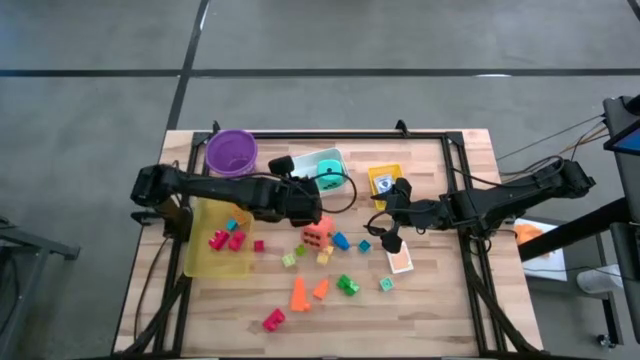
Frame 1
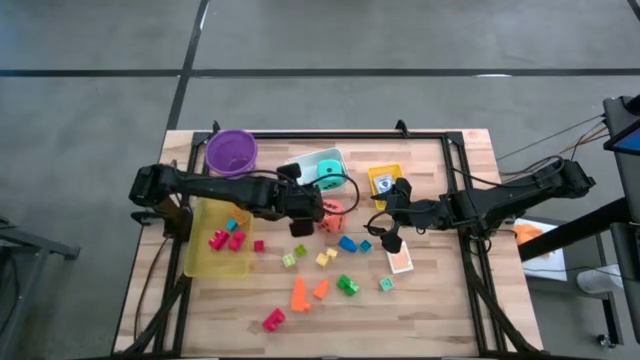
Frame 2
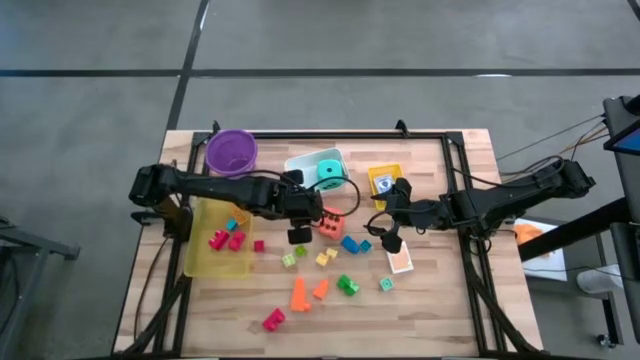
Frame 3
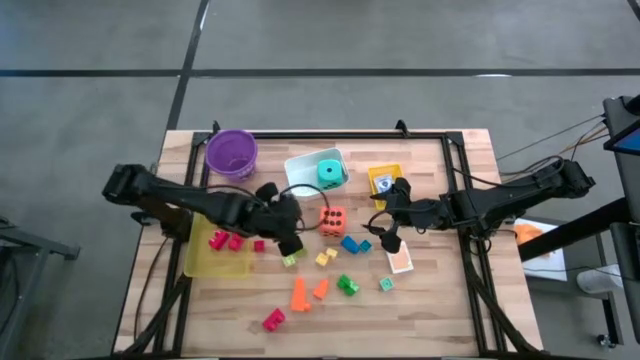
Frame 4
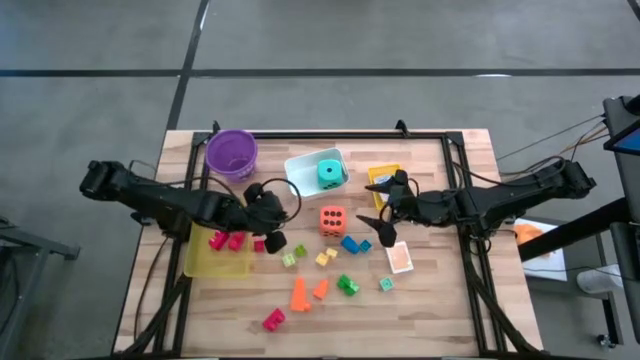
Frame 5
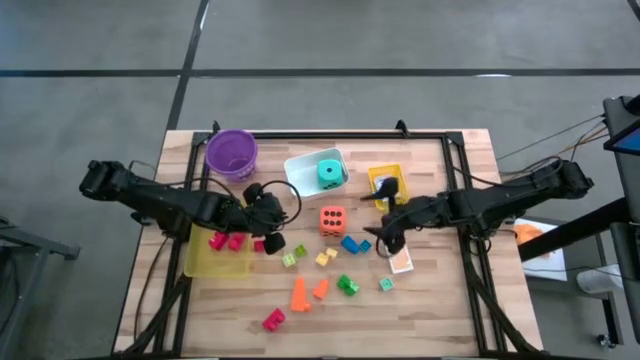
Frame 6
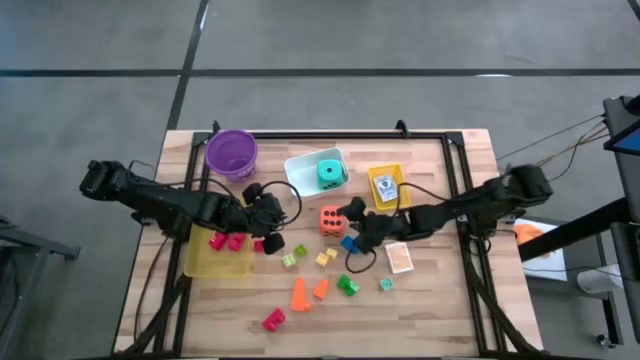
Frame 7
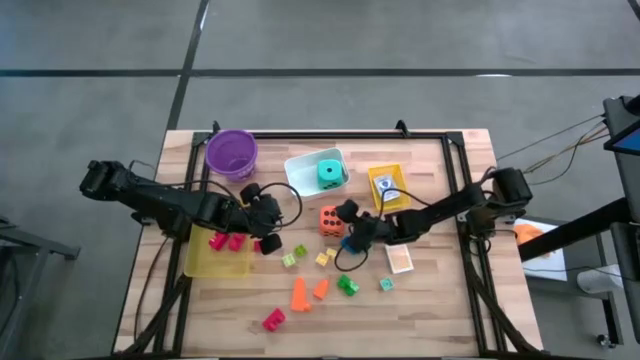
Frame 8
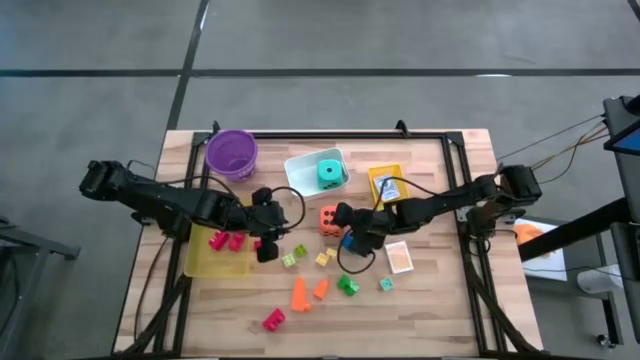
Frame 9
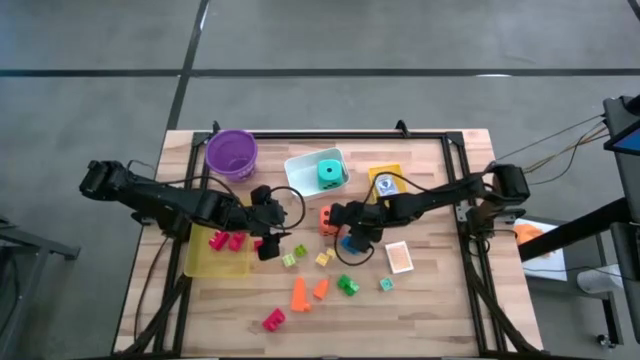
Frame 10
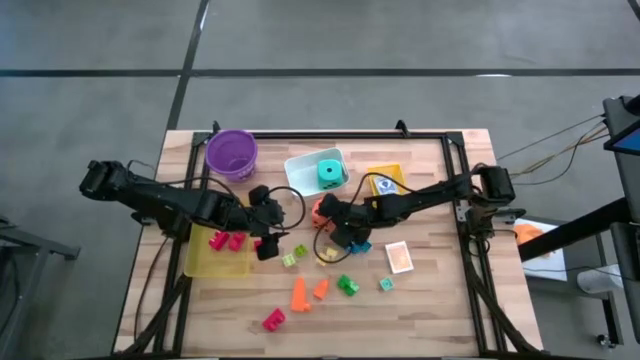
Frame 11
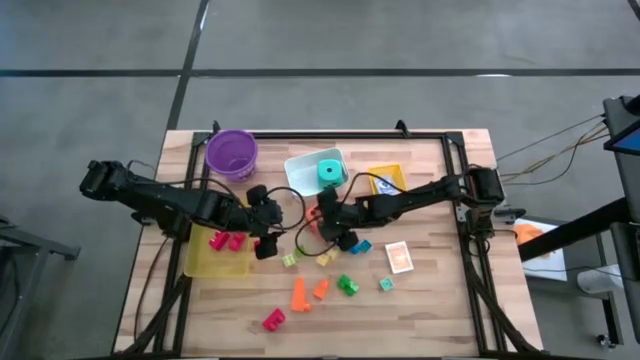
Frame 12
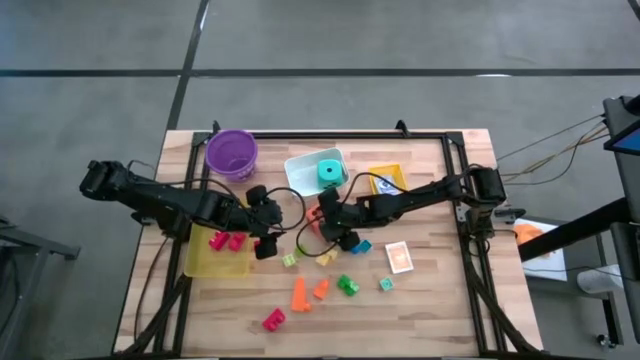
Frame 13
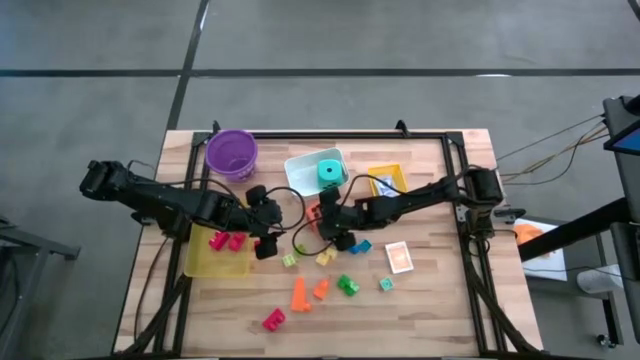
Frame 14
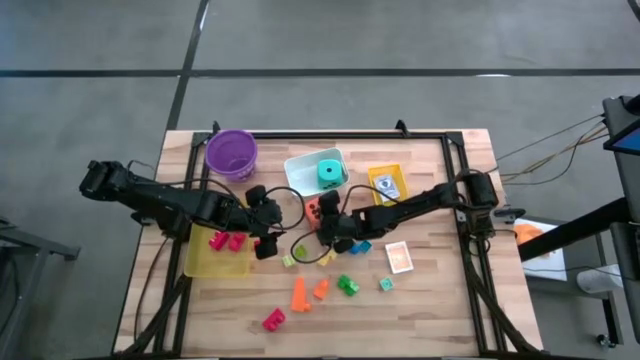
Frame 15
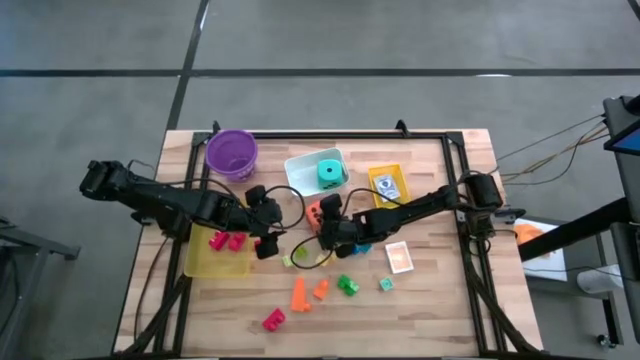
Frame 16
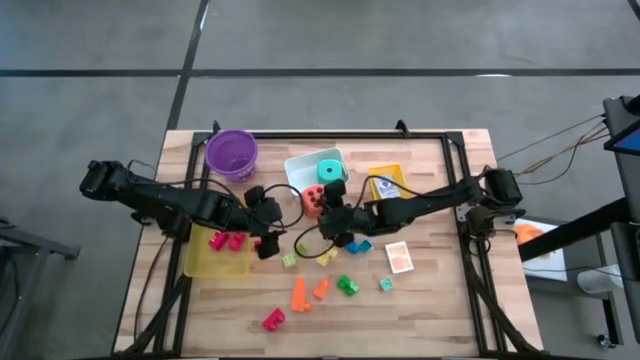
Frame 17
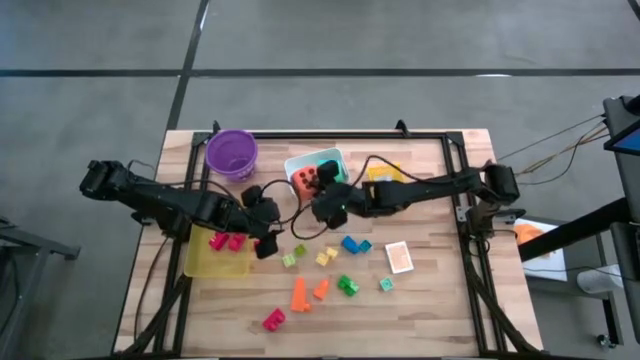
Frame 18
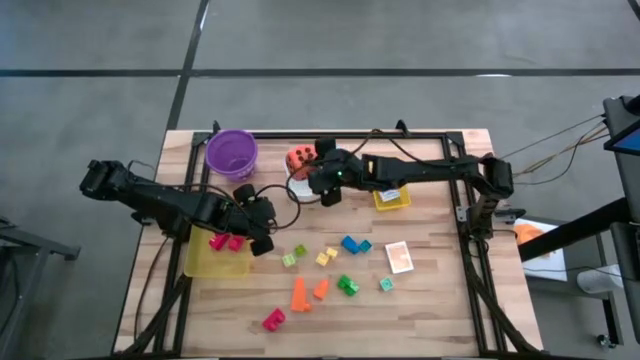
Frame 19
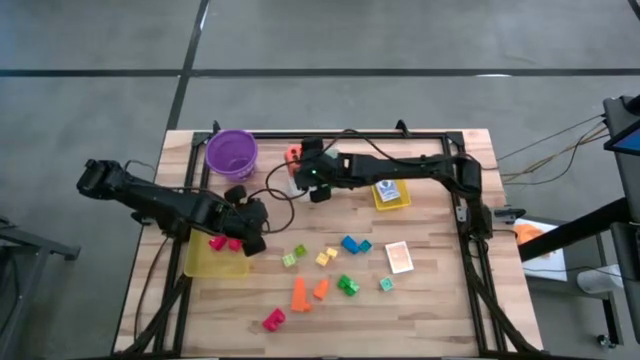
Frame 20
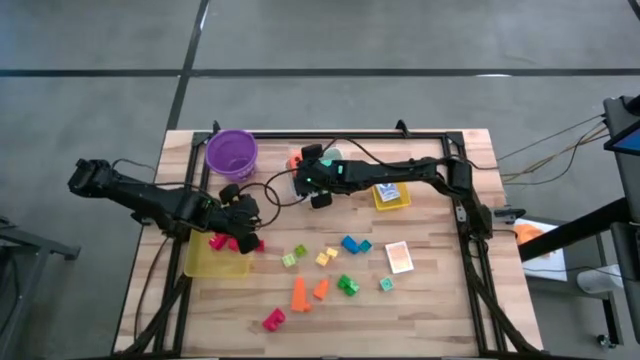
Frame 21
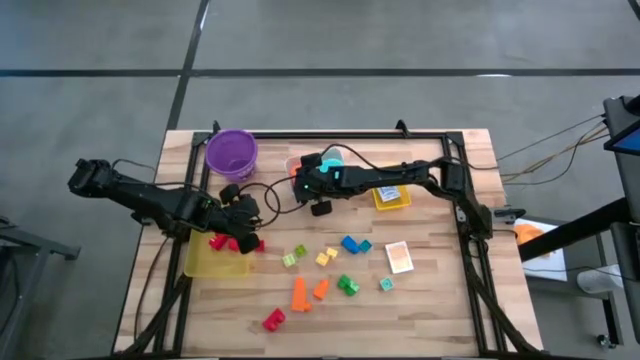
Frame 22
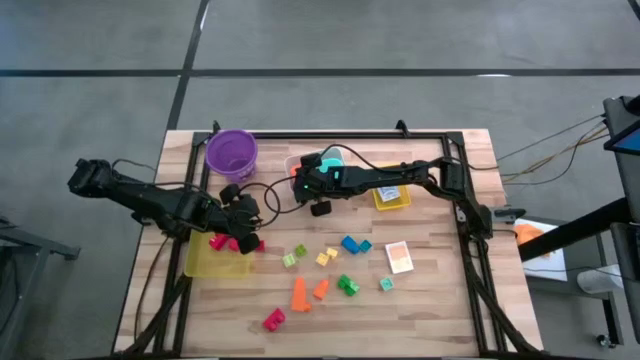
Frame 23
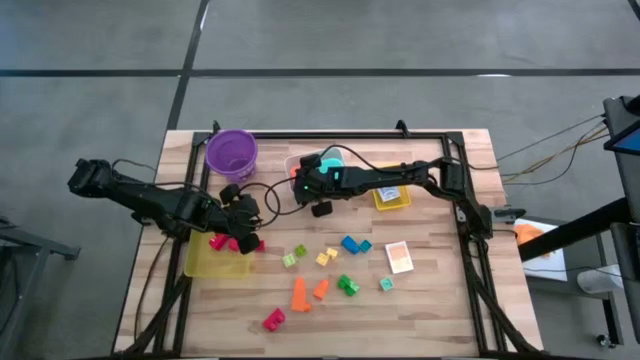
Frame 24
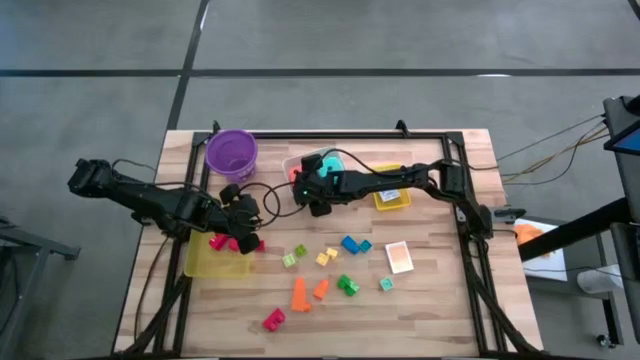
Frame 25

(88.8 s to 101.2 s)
Task: Pick & Place Toys
Put the orange dice into the white bin

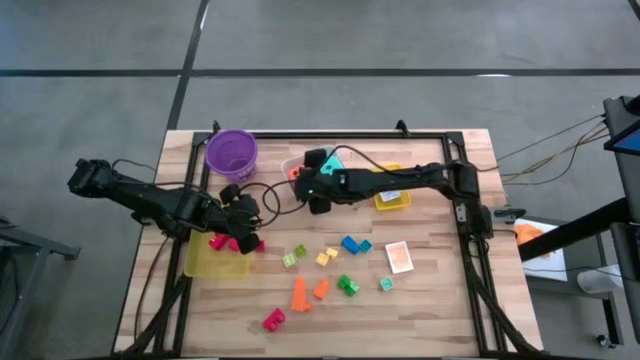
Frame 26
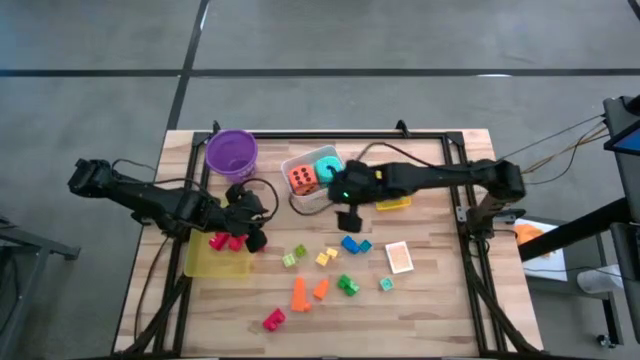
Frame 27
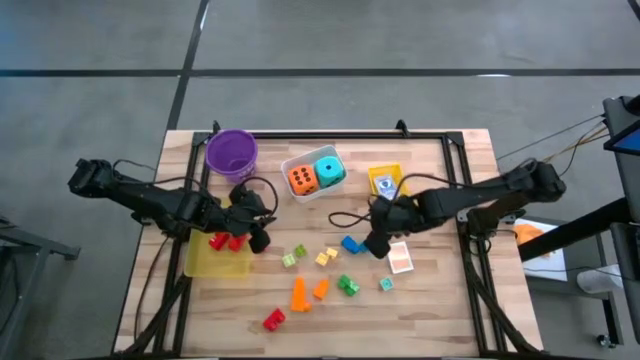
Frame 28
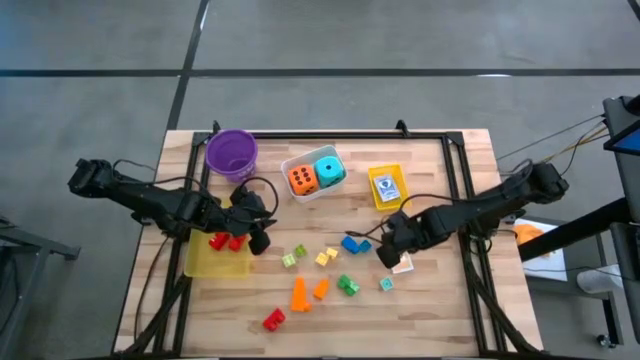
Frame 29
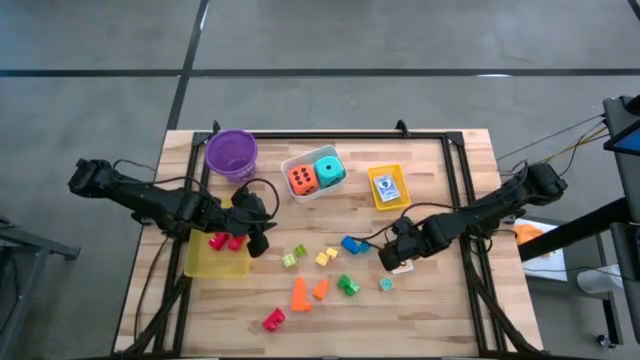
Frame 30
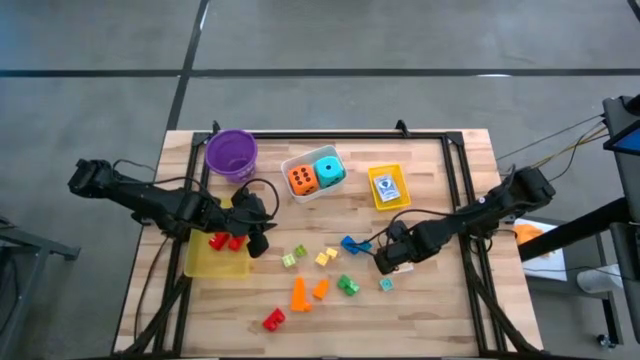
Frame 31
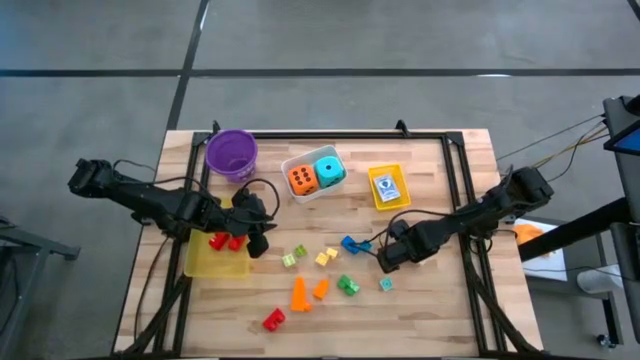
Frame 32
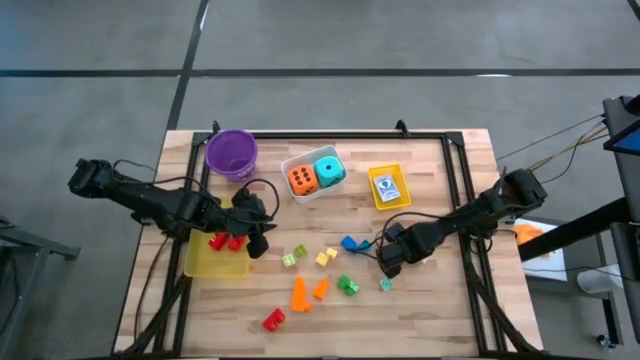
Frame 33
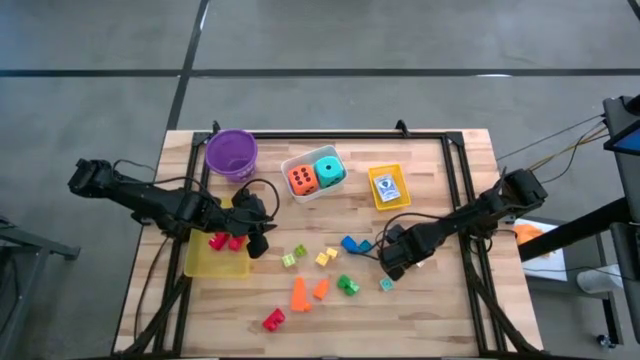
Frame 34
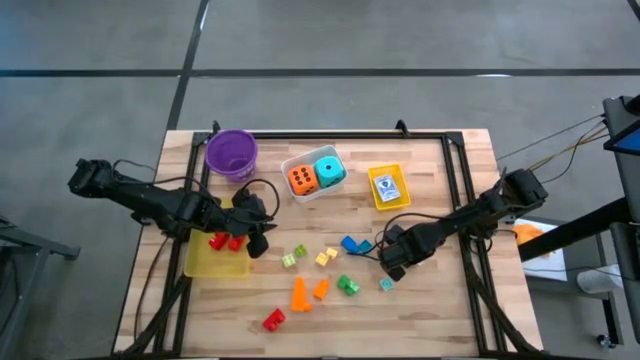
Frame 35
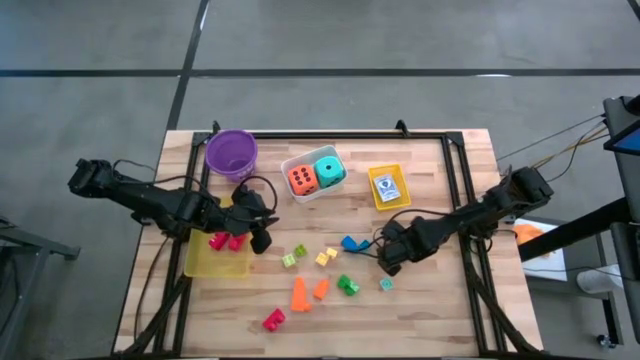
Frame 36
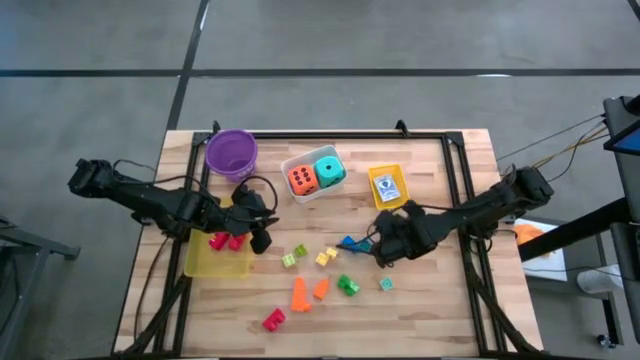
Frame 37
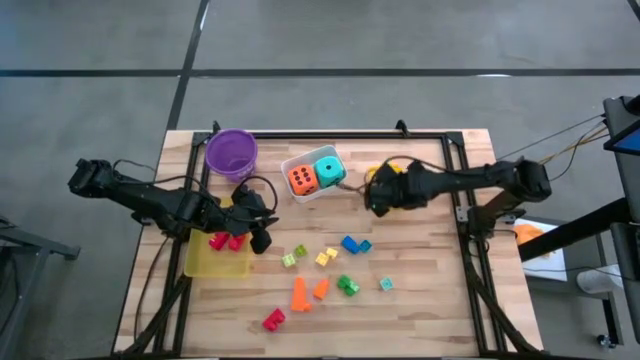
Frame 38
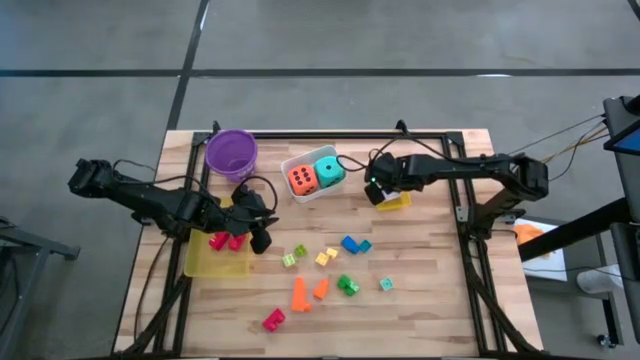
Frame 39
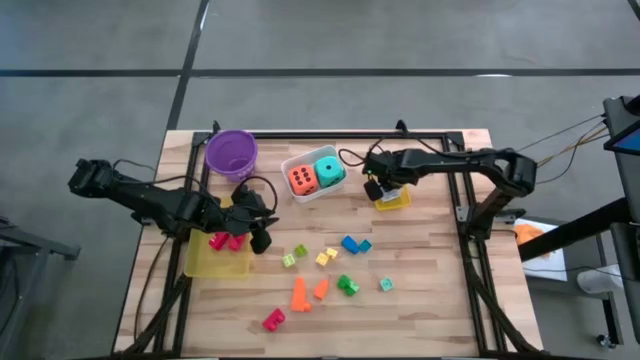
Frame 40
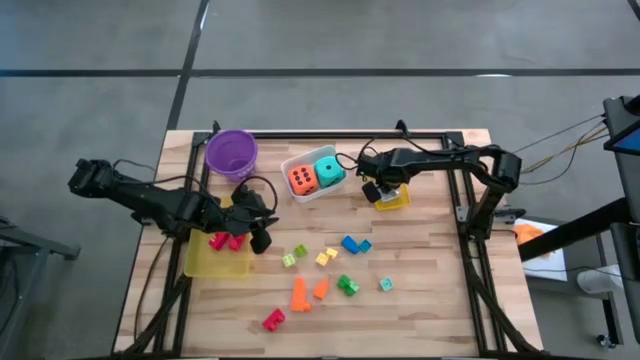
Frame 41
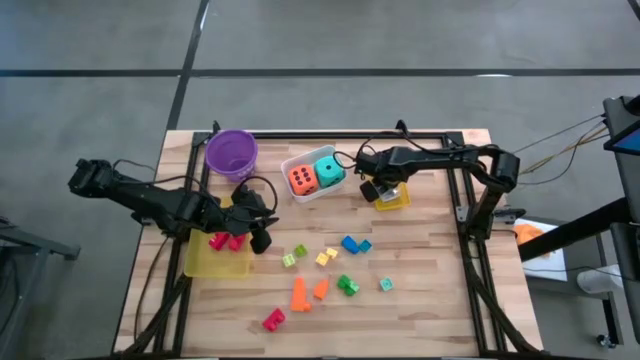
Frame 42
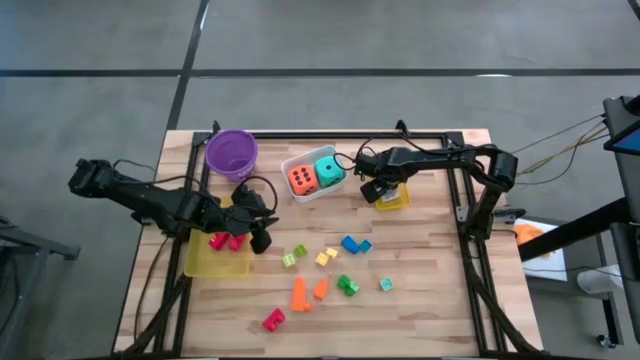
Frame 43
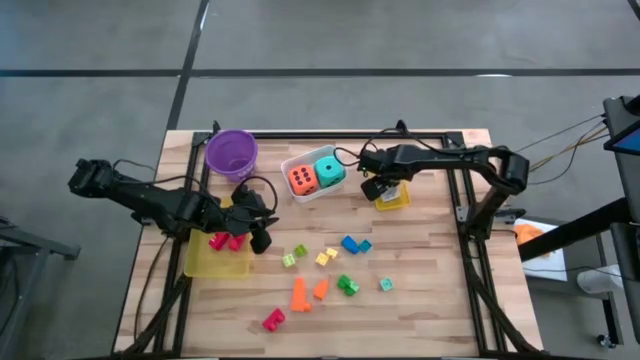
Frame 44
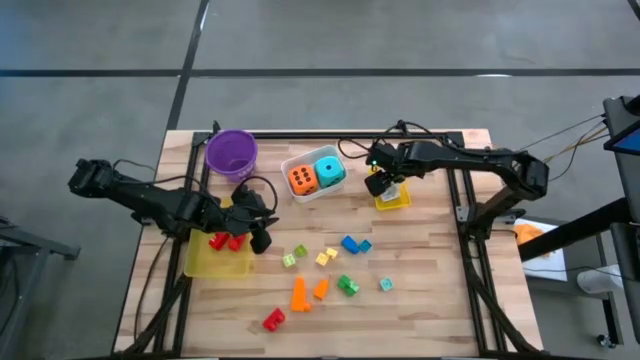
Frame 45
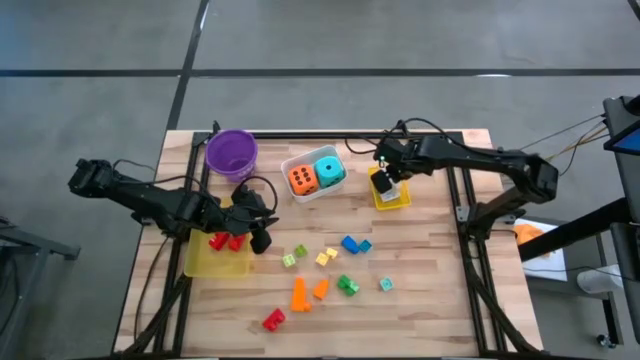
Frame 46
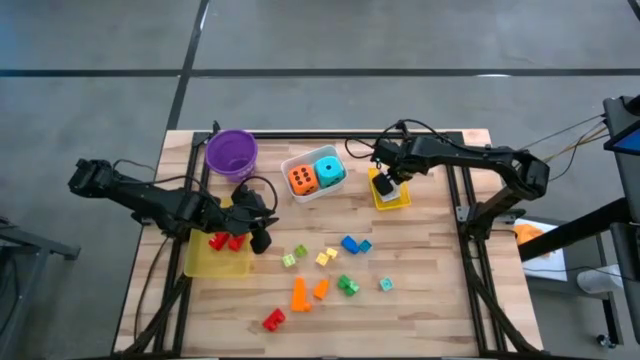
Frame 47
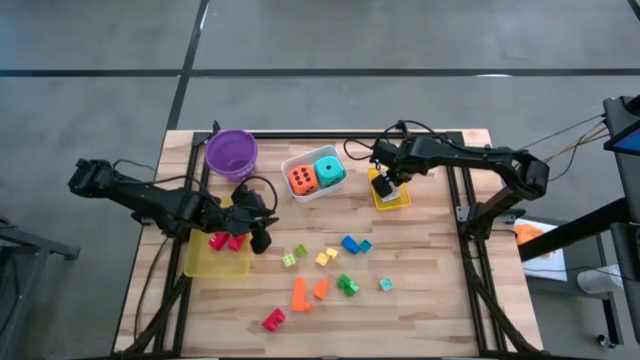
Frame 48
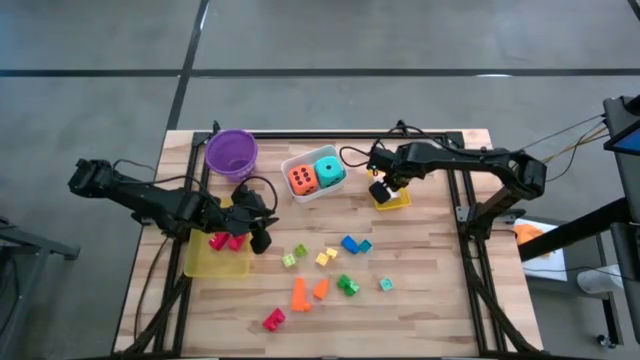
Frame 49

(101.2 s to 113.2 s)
Put the orange deck of cards into the yellow bin
